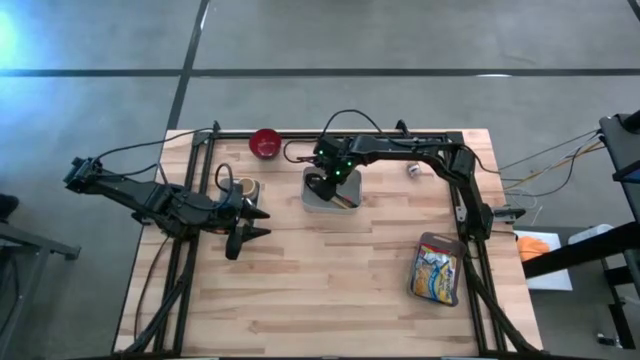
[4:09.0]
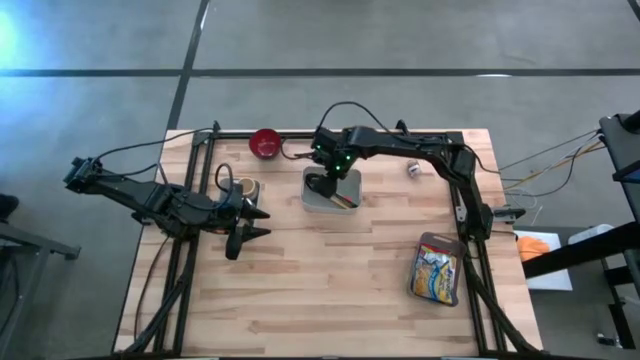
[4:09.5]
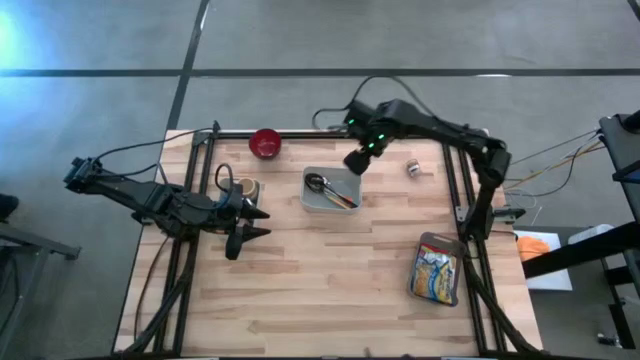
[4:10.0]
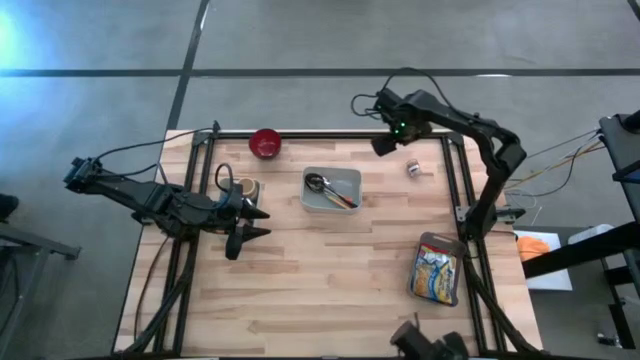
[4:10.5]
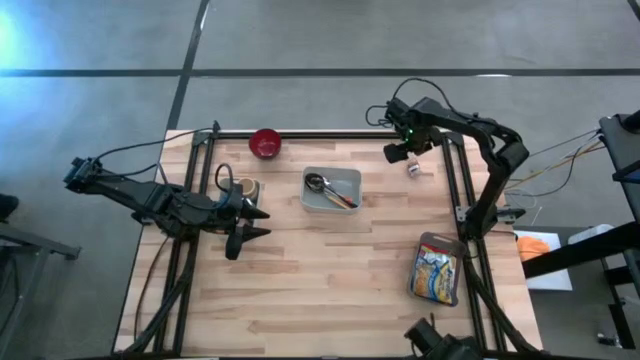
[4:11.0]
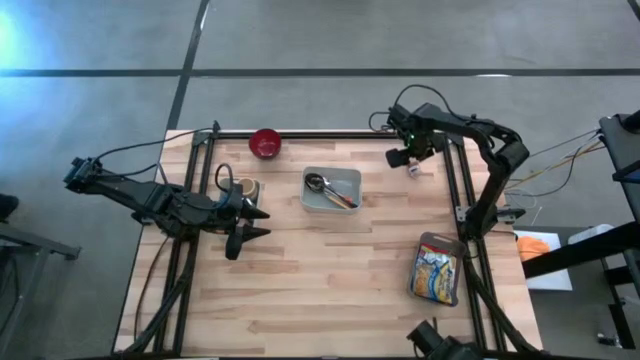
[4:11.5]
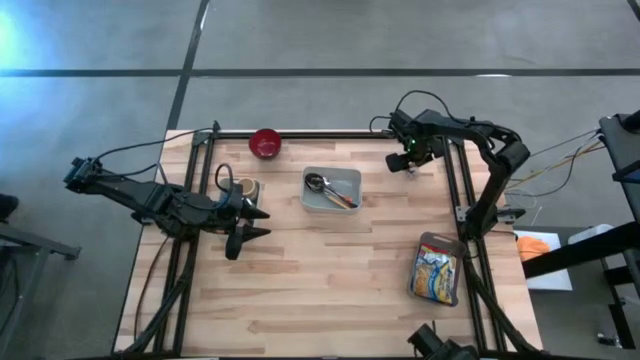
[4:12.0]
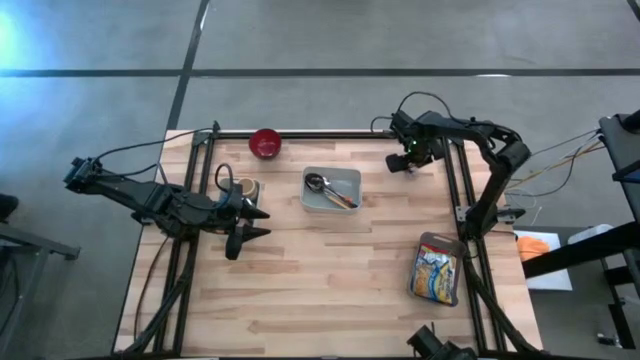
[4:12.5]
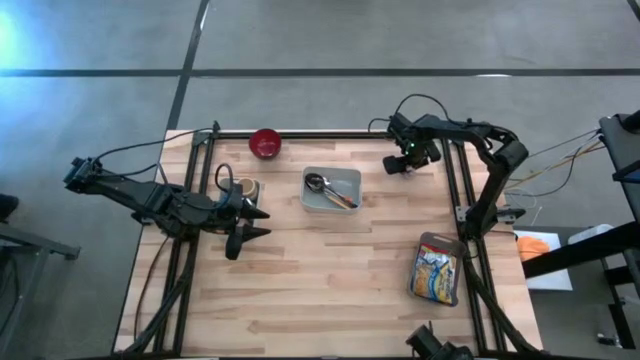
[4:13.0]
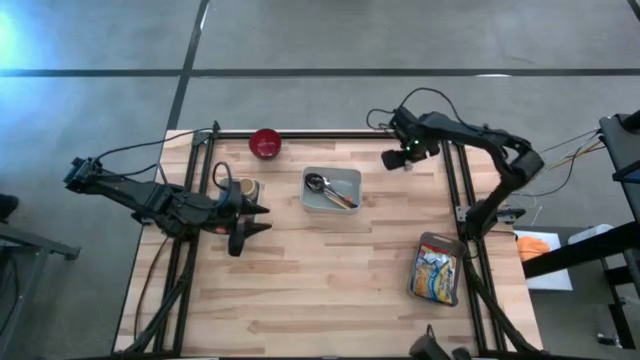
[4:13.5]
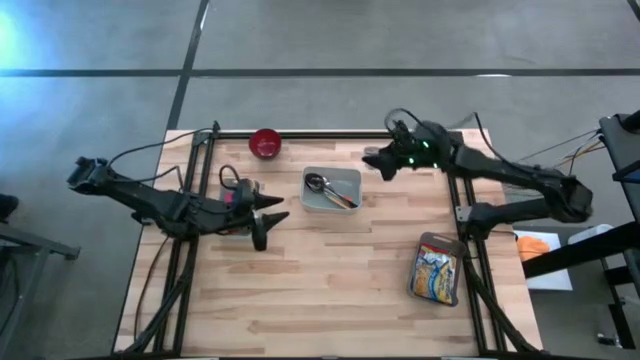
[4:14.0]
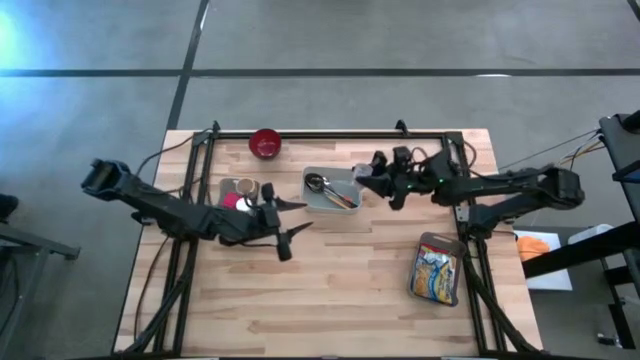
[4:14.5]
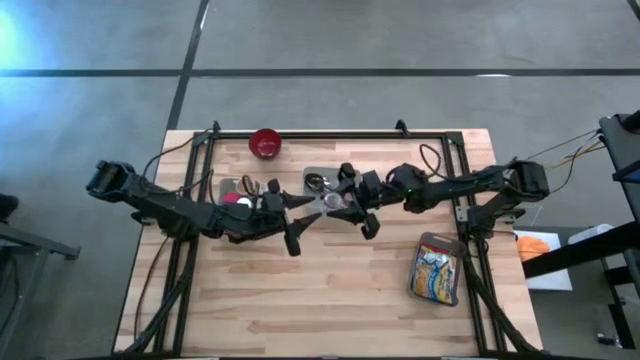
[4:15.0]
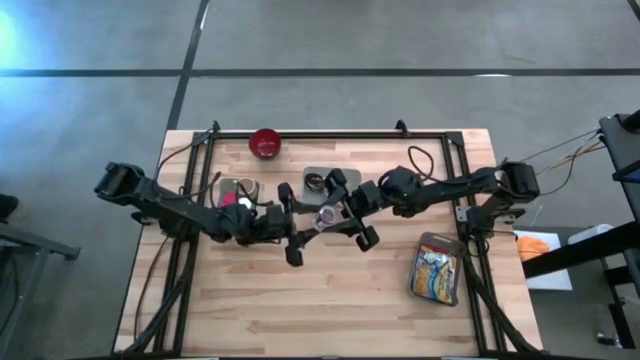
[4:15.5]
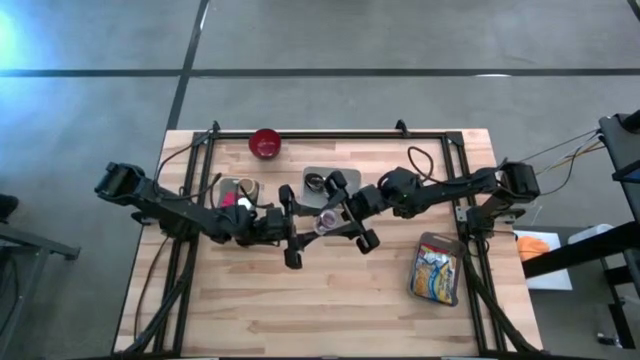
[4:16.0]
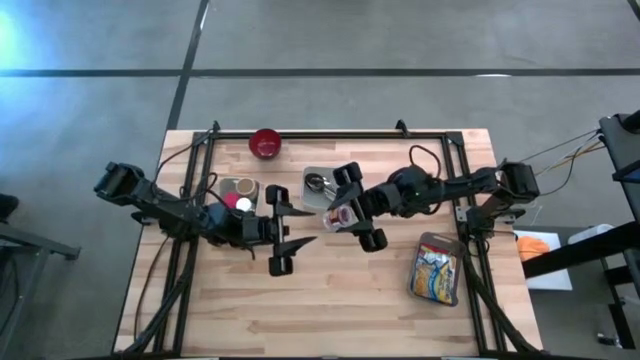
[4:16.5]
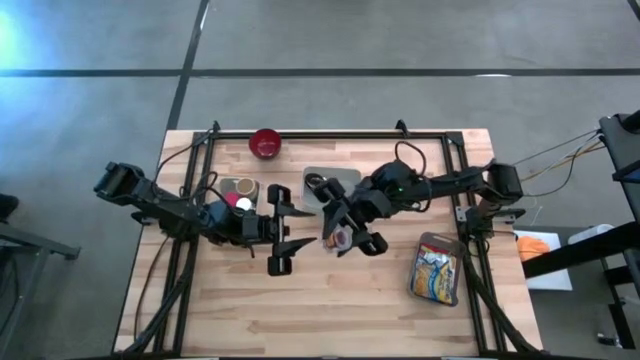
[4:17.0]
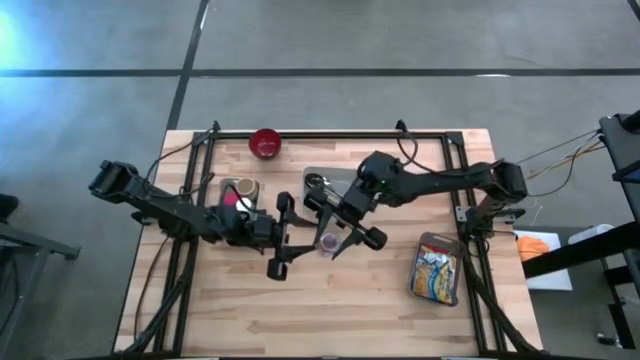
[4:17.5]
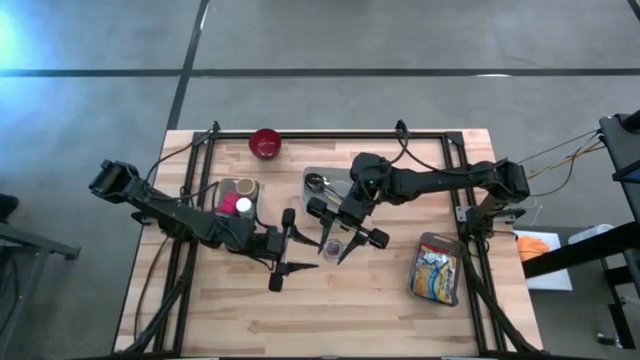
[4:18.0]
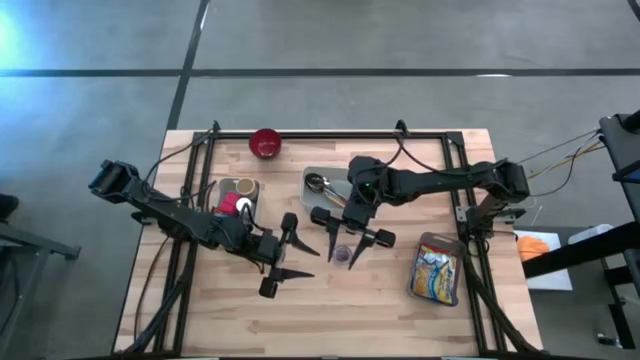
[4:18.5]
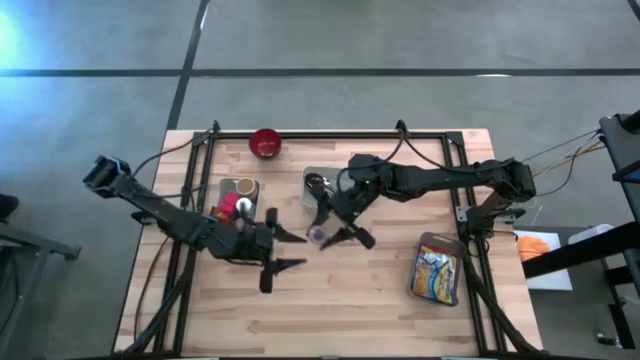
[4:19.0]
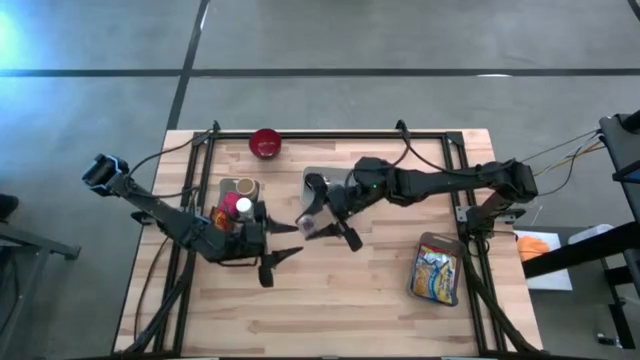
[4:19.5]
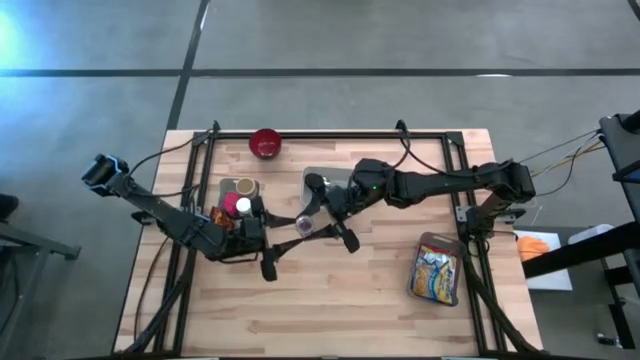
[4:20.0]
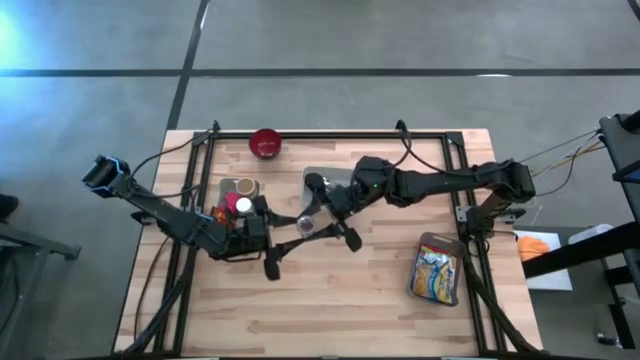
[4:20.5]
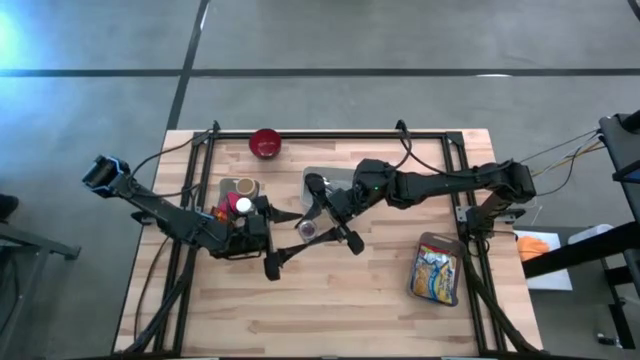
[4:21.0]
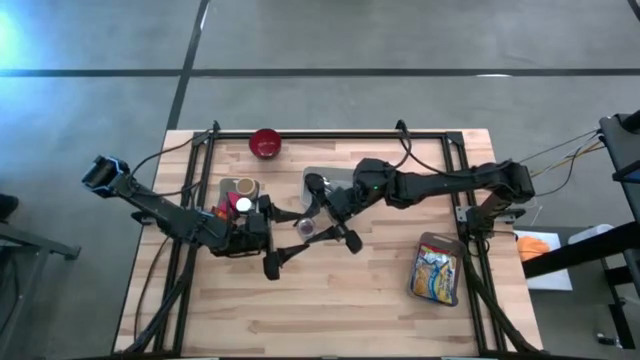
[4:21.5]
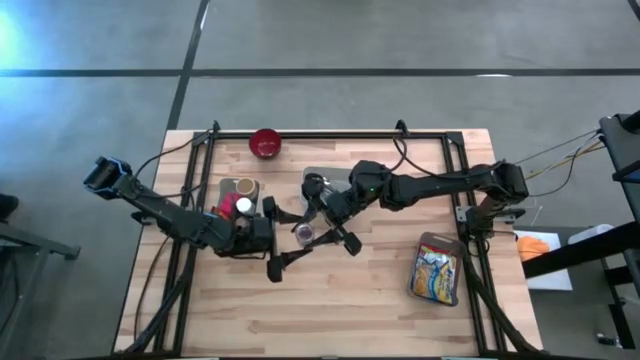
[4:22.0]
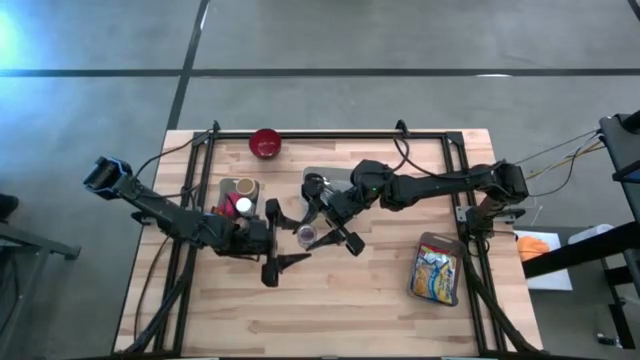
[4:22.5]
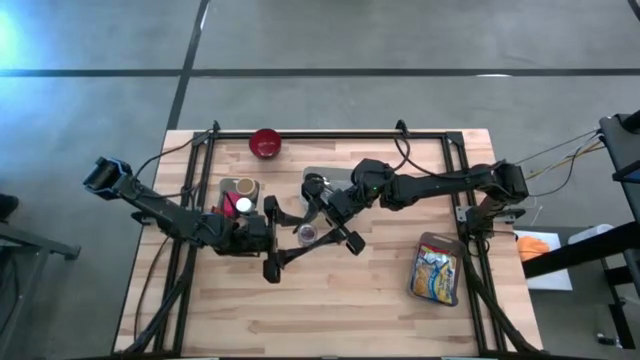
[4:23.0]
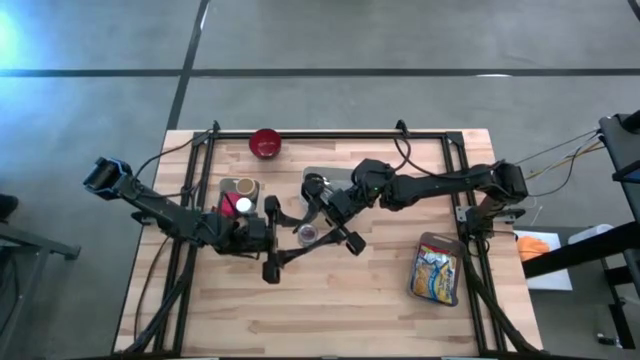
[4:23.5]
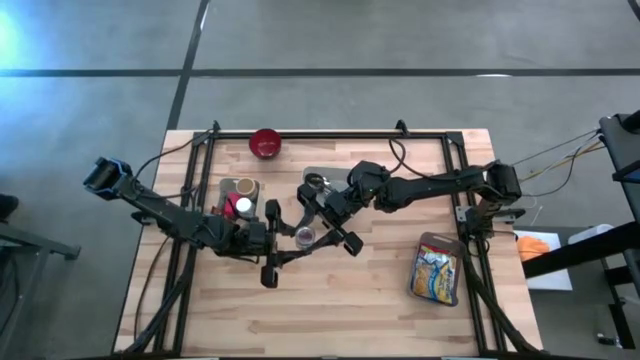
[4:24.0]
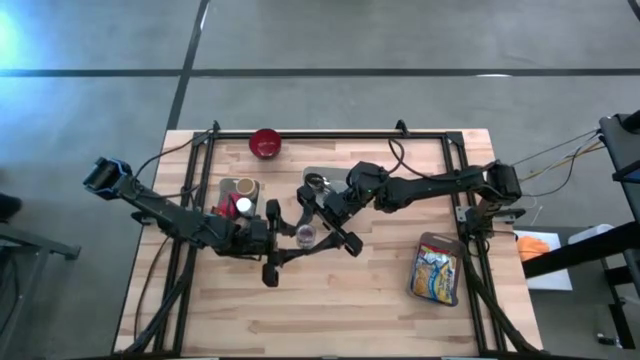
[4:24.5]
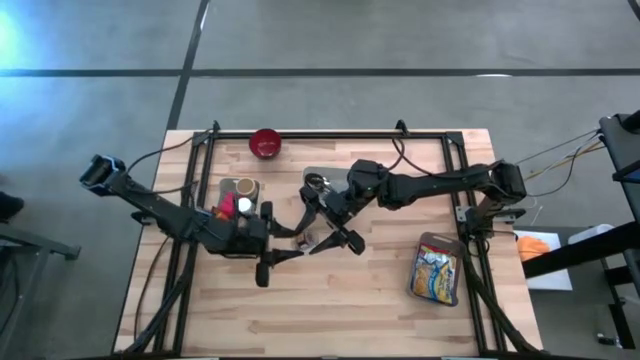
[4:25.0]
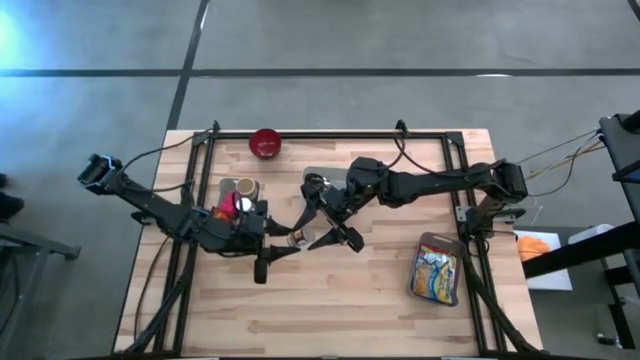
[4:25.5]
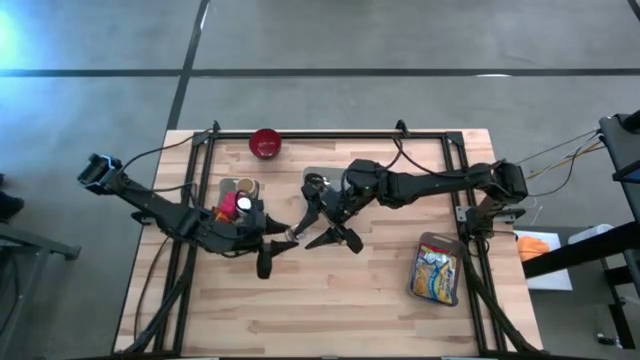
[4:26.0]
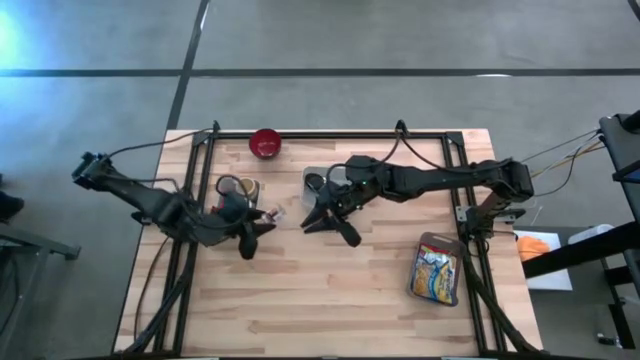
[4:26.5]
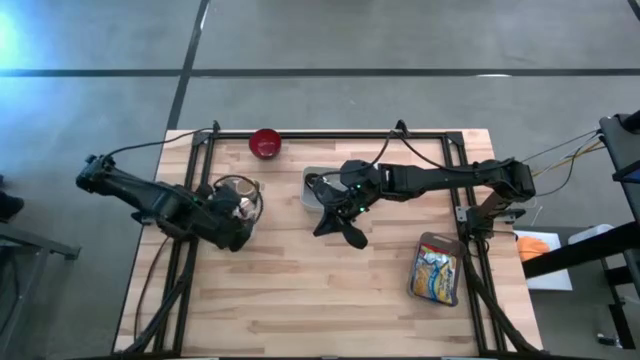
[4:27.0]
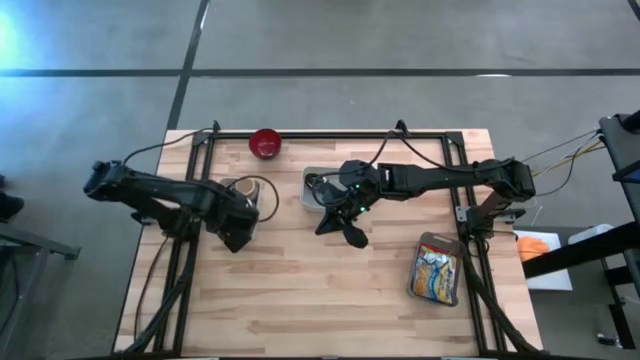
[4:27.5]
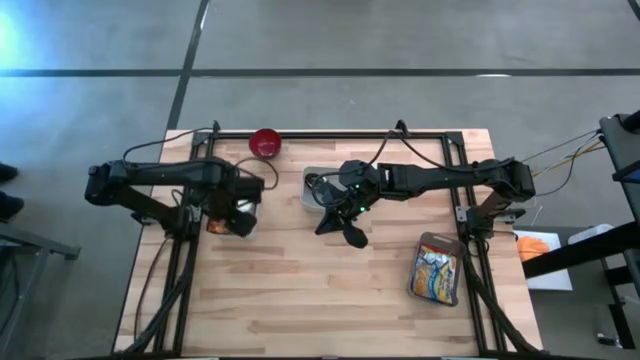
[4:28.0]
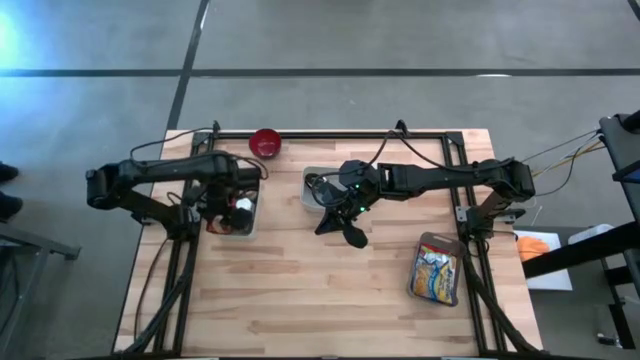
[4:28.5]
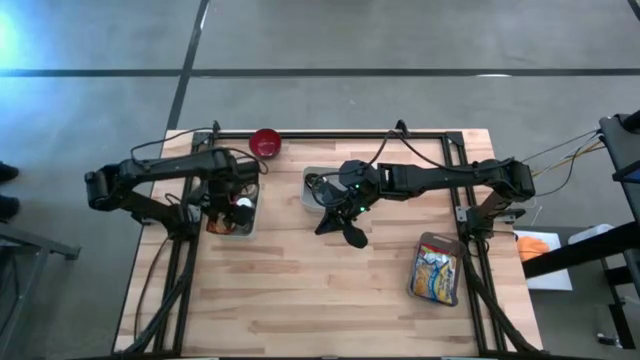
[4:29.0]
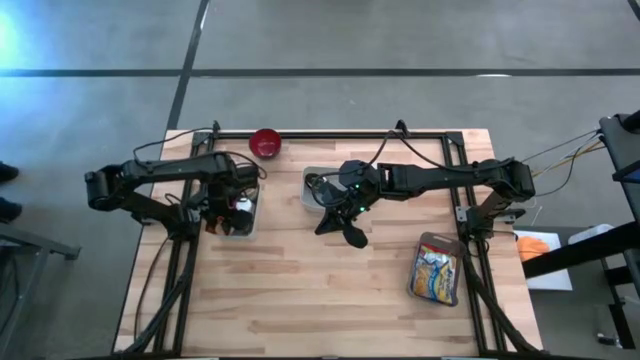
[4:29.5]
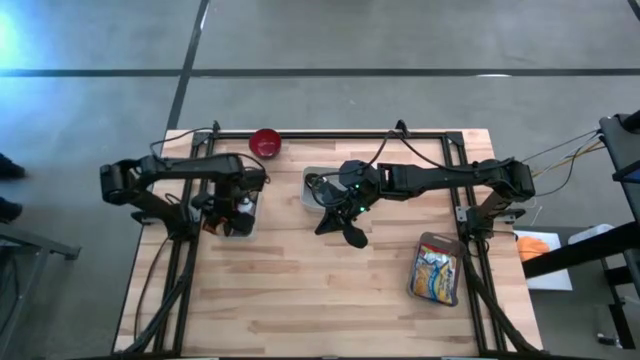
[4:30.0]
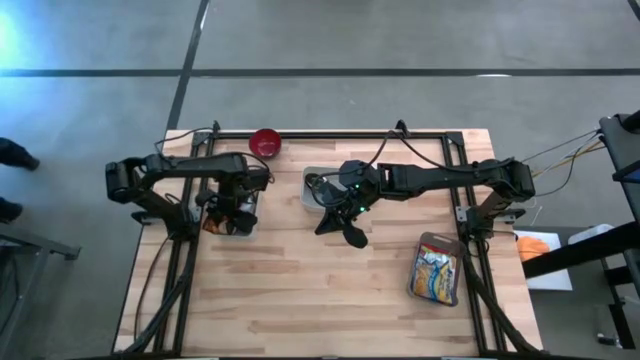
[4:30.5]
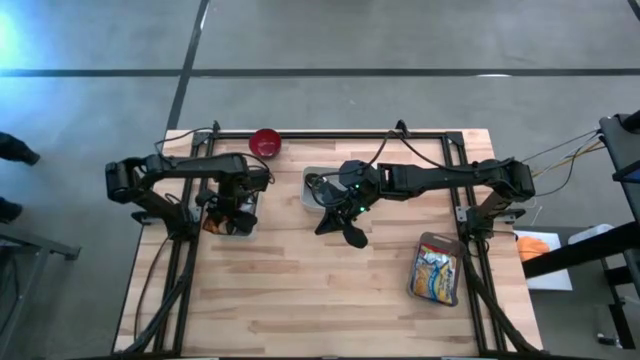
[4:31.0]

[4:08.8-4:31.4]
Put the brown seasoning bottle into the left gray bin
